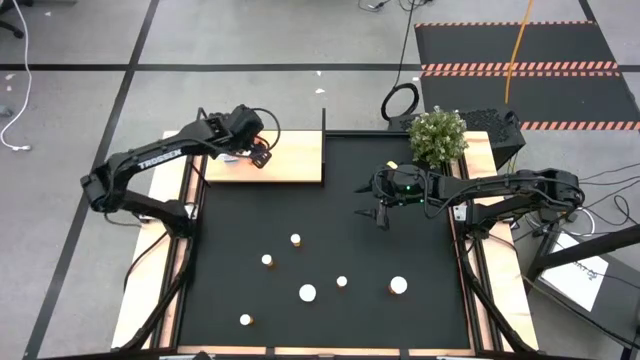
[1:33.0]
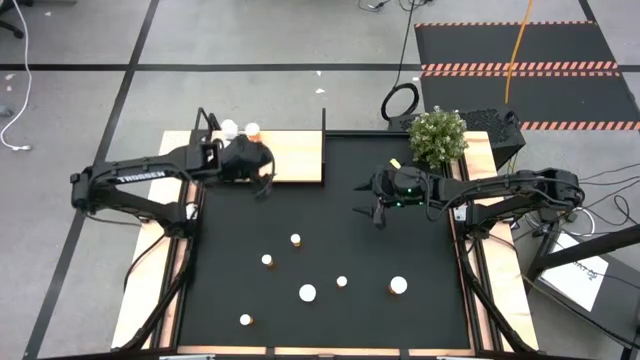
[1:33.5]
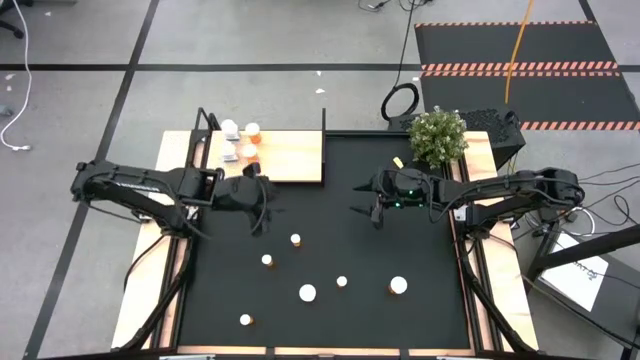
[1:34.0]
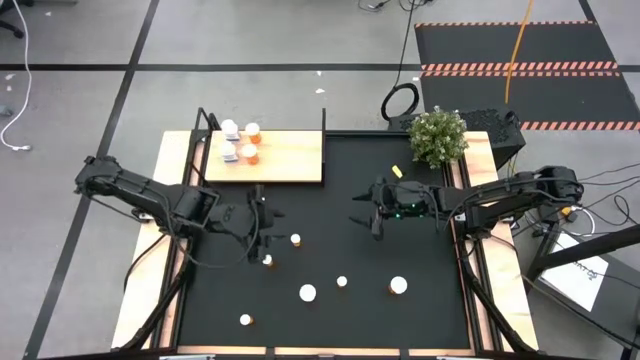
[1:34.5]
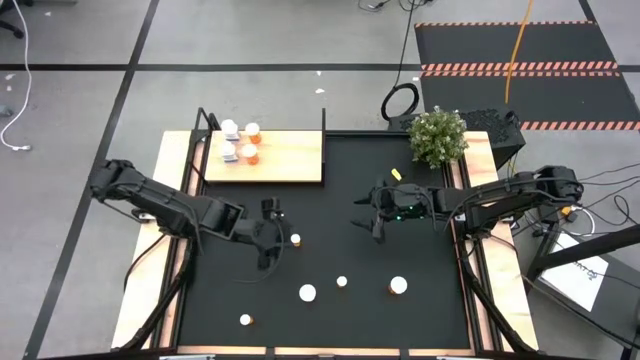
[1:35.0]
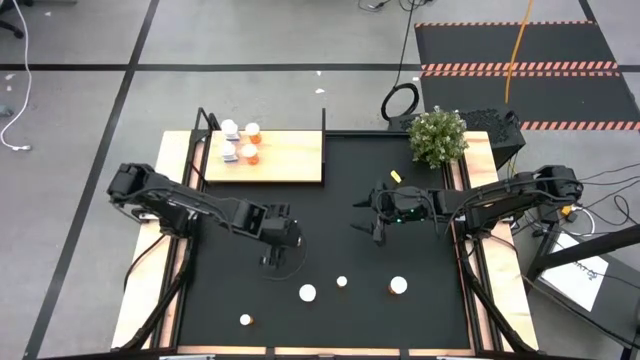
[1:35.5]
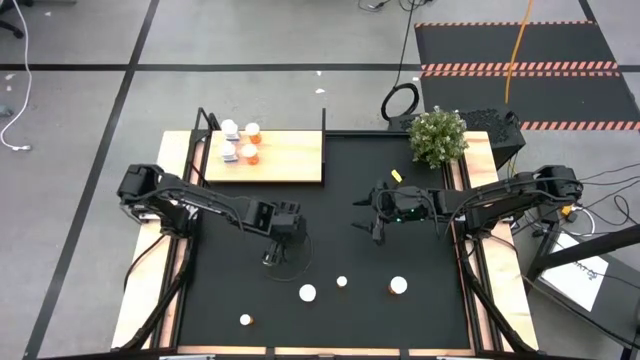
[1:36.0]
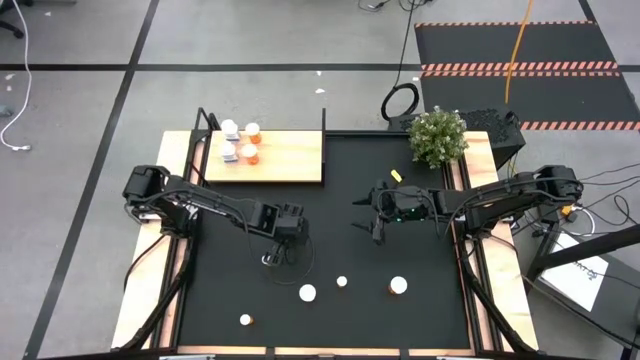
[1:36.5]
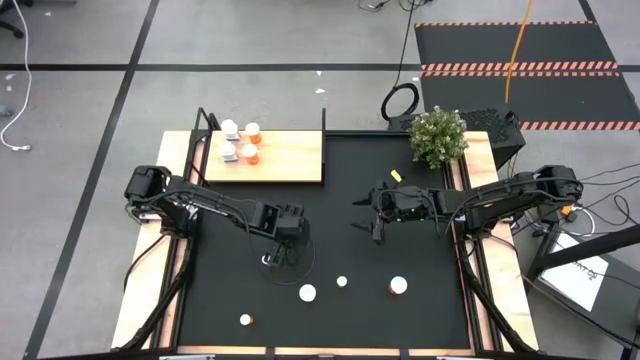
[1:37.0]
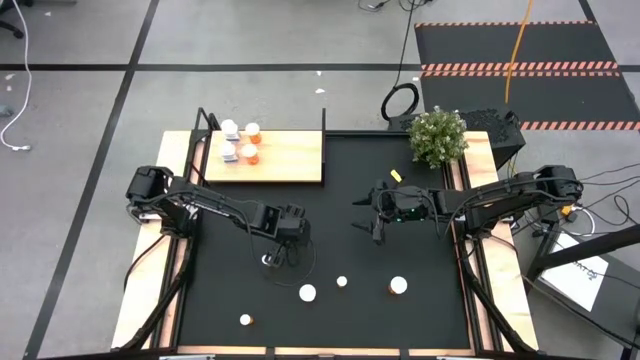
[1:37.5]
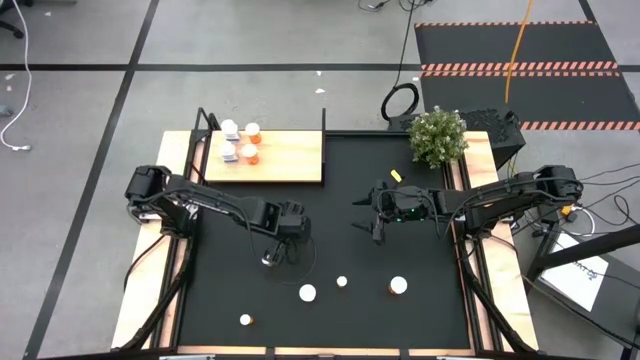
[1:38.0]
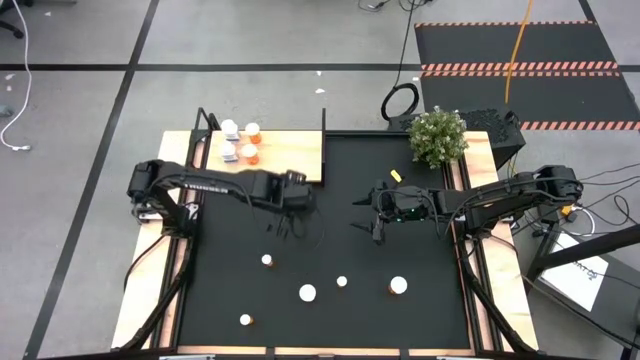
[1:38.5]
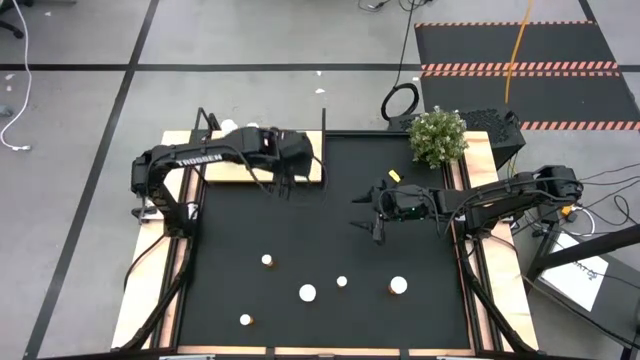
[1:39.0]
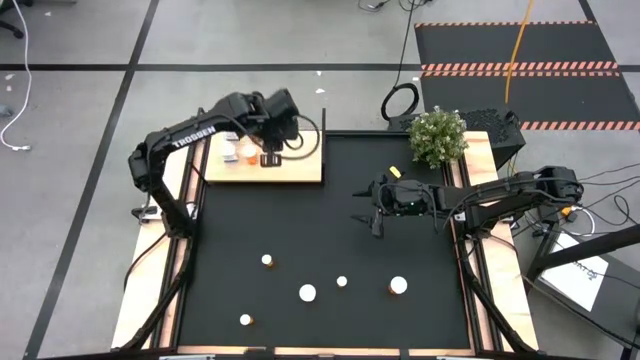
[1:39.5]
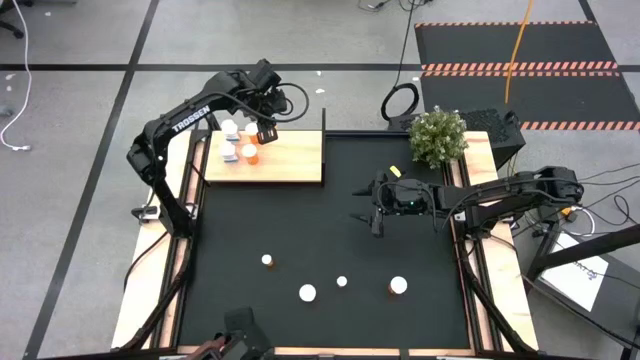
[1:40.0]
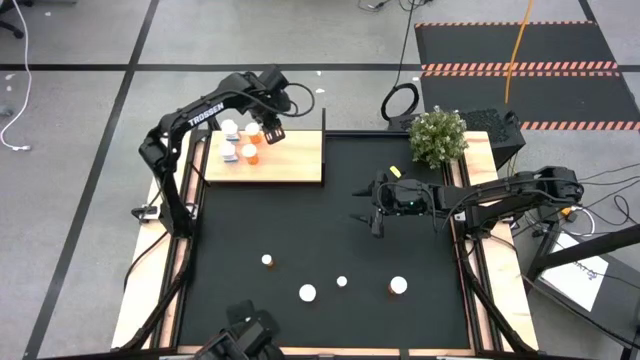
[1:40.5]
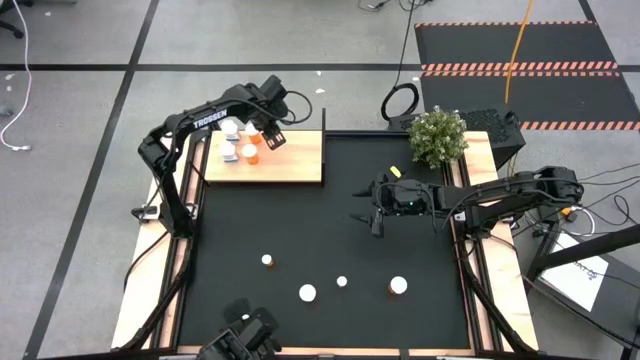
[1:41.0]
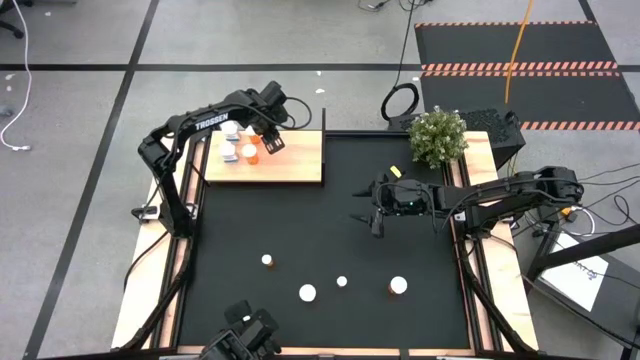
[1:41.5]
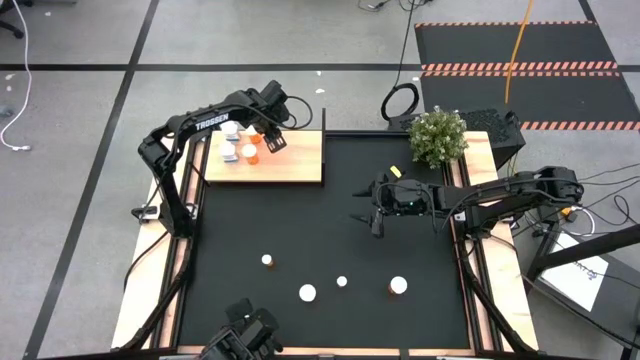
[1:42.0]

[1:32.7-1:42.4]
Task: Pick and place medicine bottles onto shelf by color
Put the small orange pill bottle on the shelf

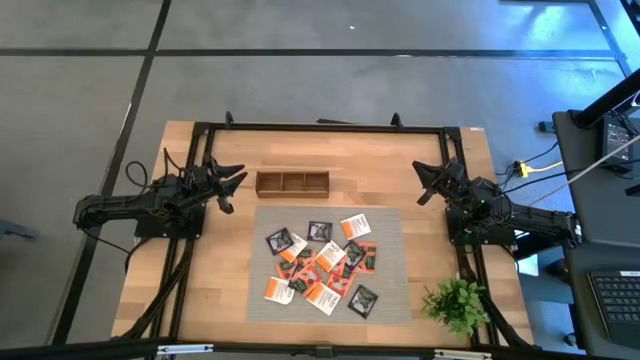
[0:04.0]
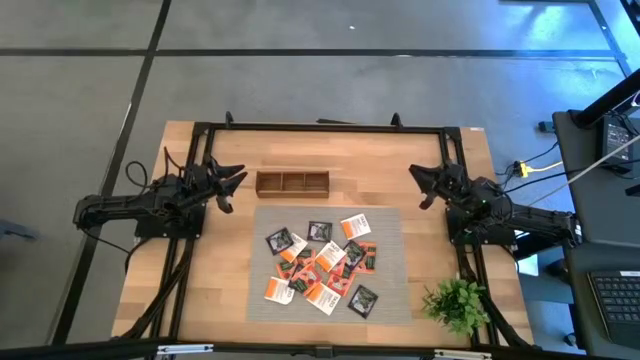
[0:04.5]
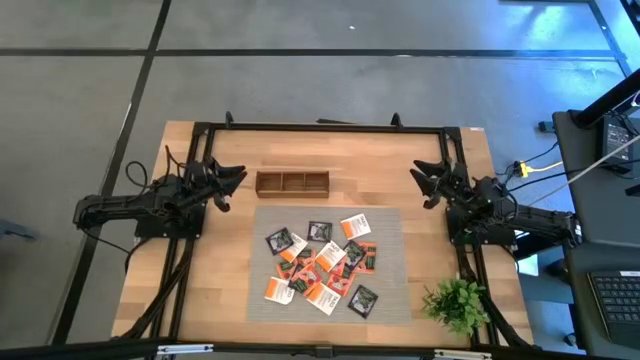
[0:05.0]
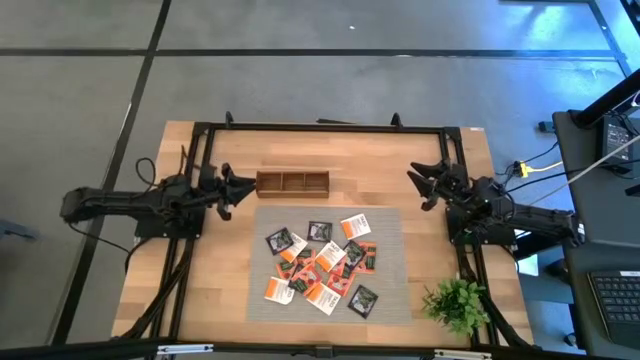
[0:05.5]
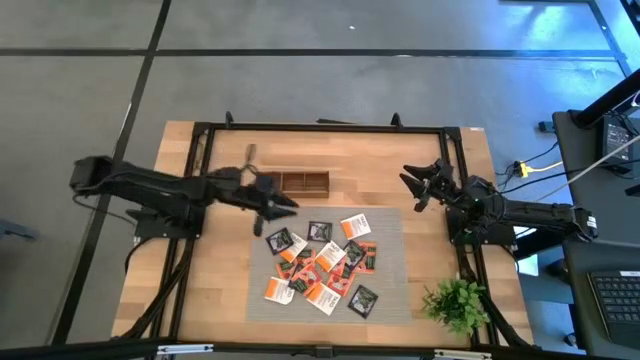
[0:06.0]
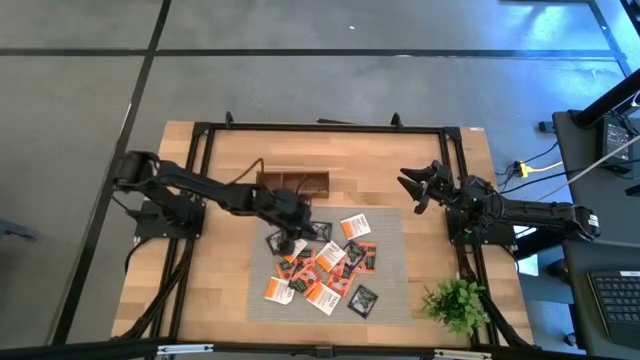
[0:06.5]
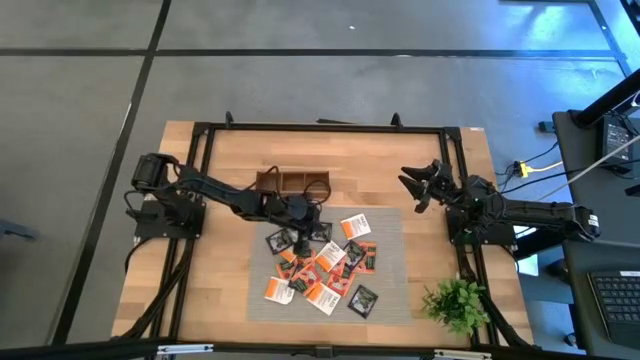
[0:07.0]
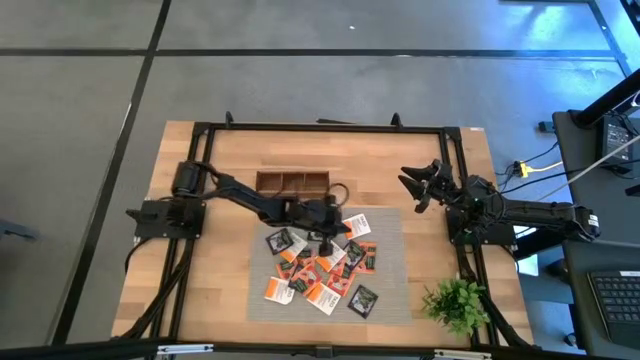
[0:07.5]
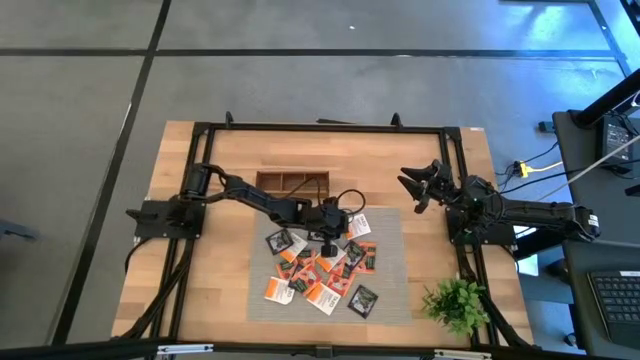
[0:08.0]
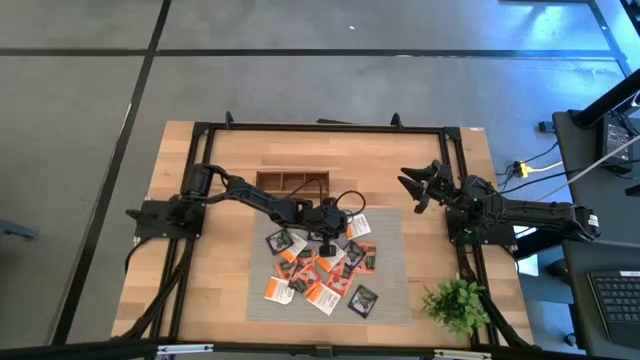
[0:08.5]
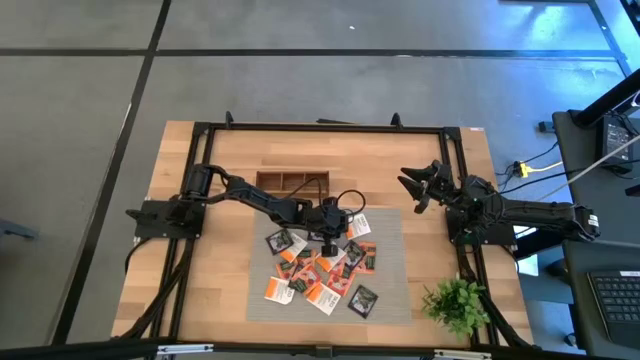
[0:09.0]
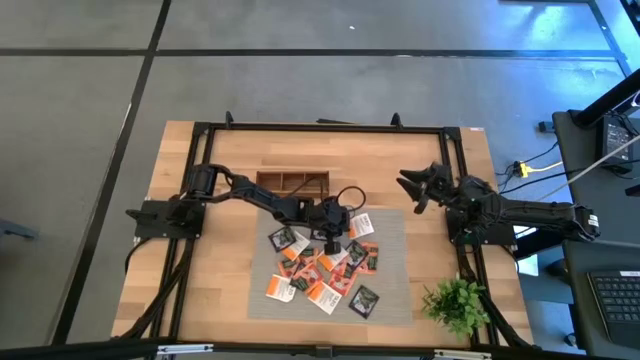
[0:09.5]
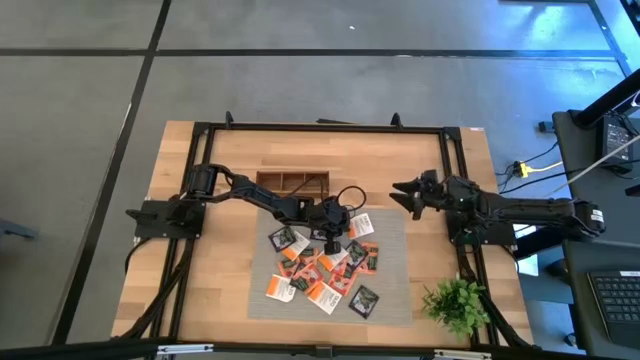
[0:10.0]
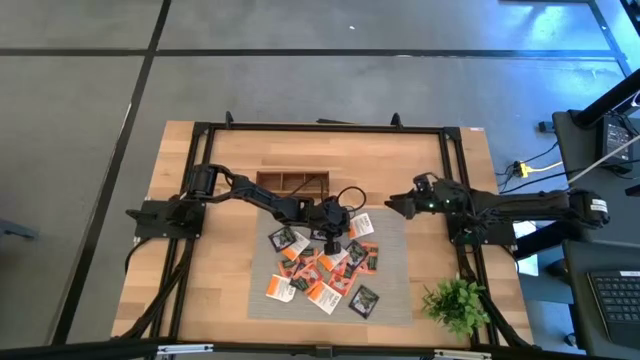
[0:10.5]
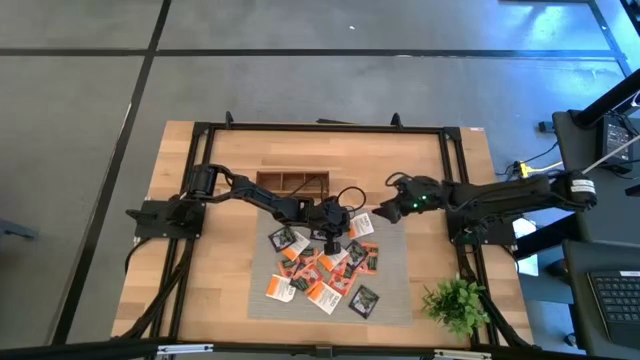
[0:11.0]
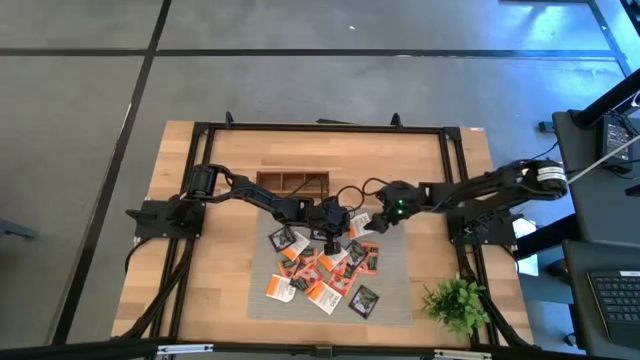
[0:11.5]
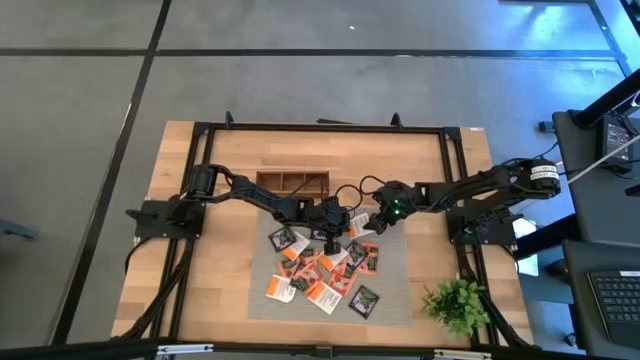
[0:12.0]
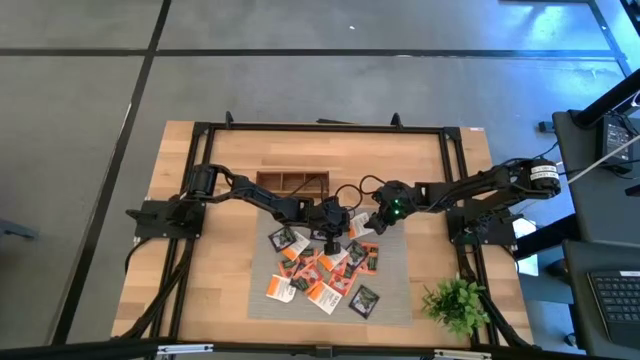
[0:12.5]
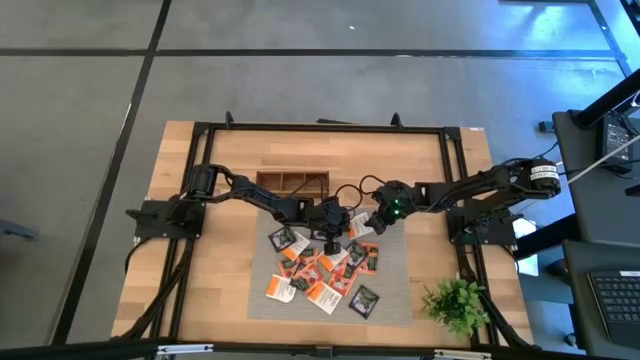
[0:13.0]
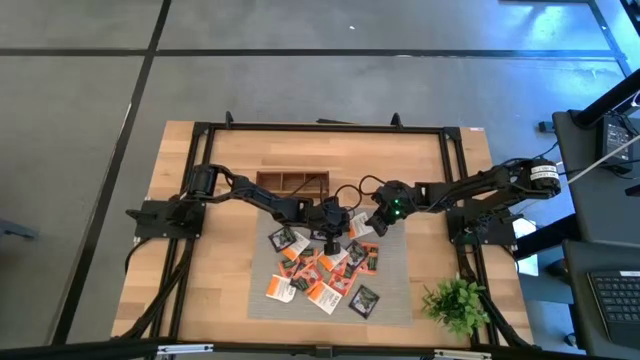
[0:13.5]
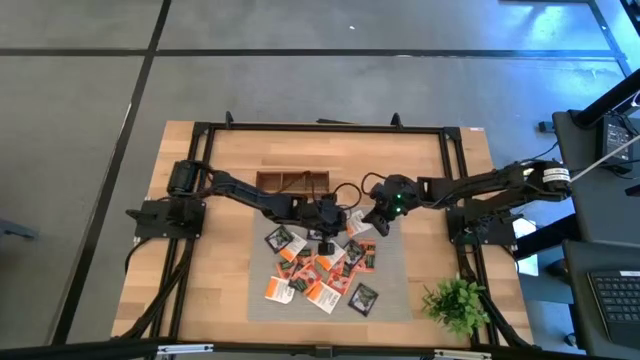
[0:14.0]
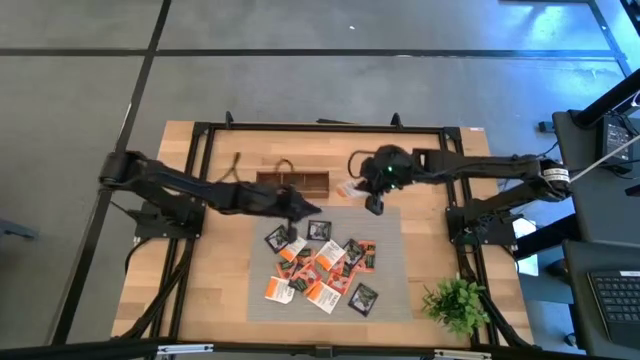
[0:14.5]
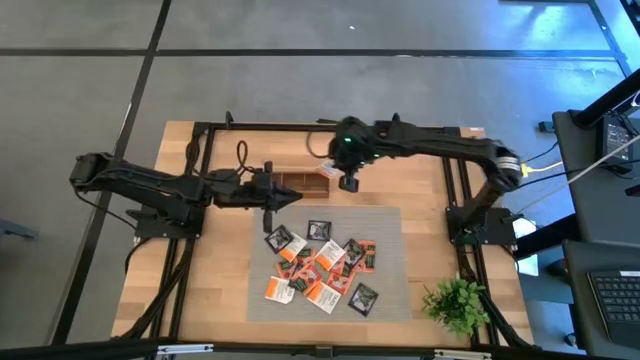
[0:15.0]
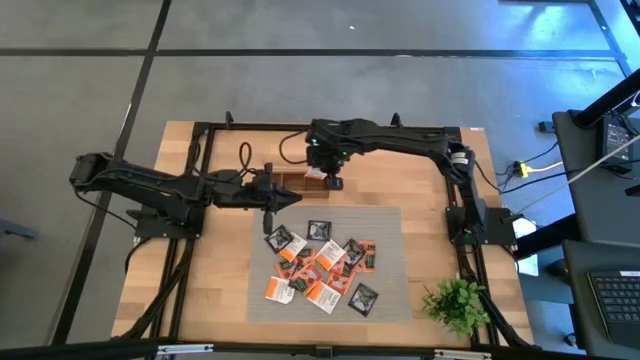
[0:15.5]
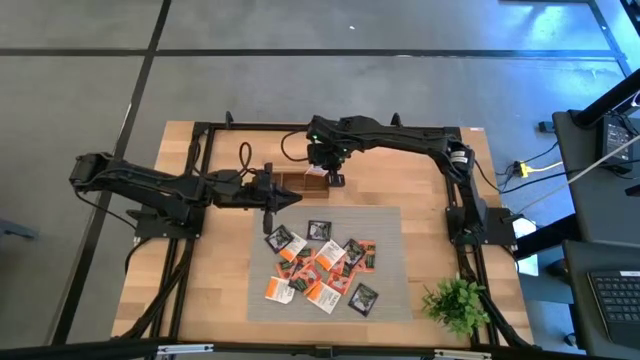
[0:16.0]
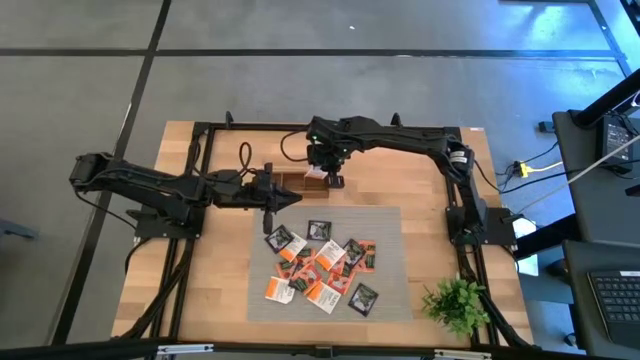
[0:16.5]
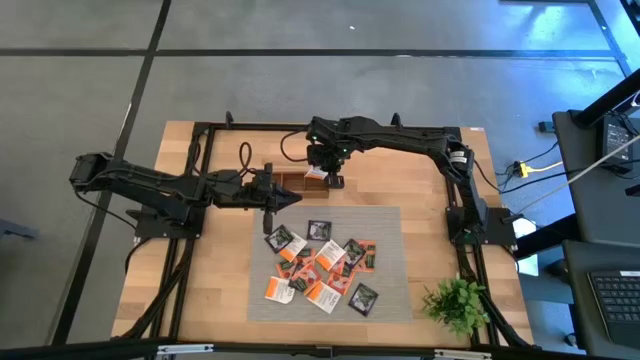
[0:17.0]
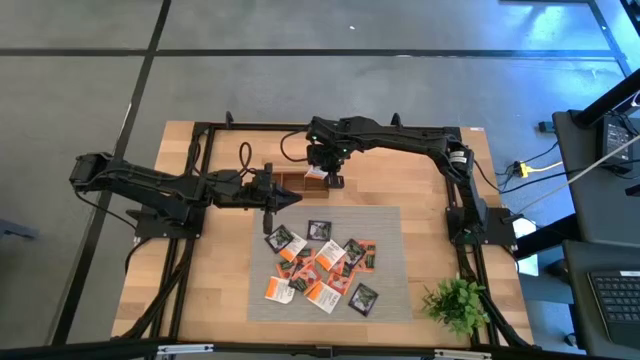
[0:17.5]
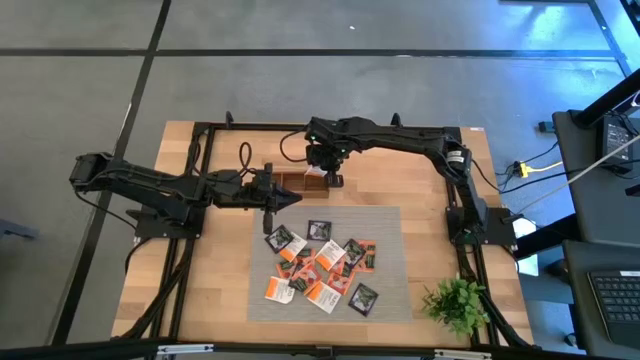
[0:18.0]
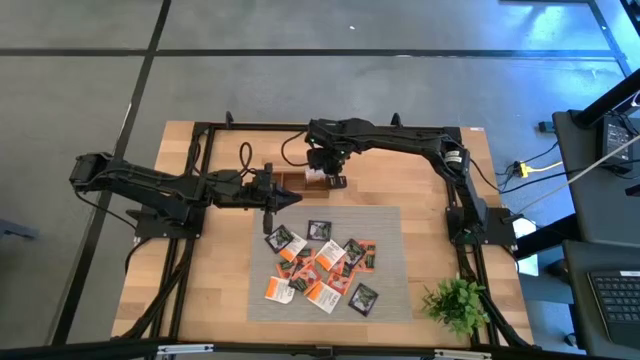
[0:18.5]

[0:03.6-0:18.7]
Task: Pick & Place Tea
Put the white orange tea bag into the right section of the wooden organizer
